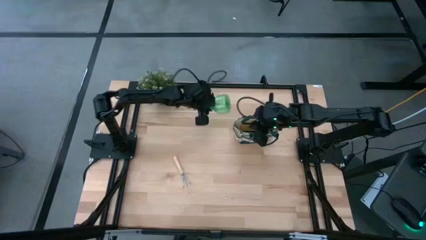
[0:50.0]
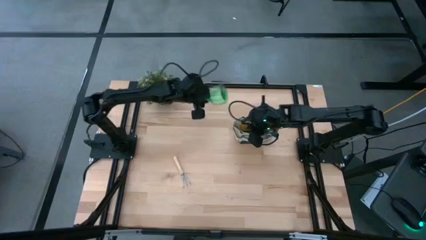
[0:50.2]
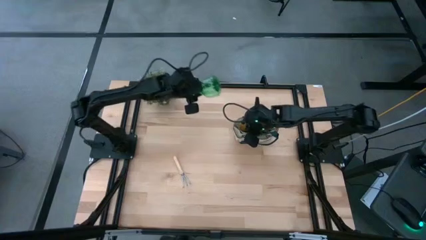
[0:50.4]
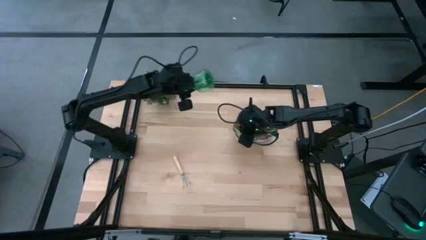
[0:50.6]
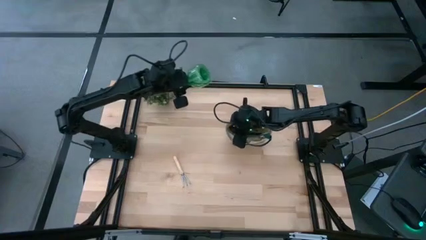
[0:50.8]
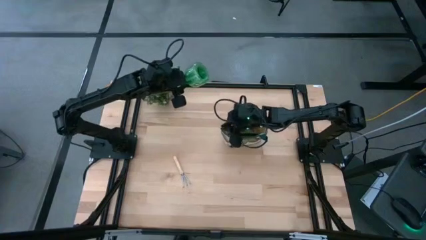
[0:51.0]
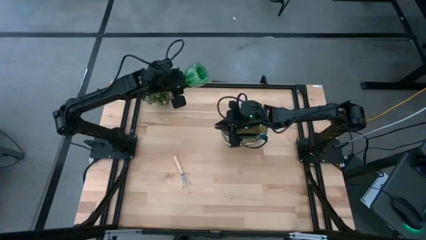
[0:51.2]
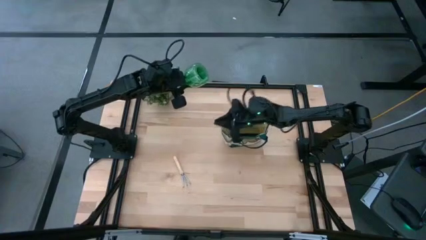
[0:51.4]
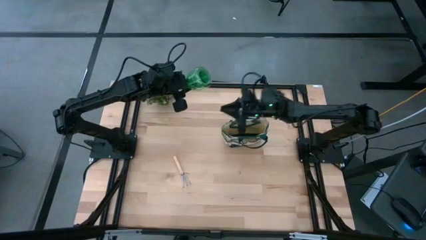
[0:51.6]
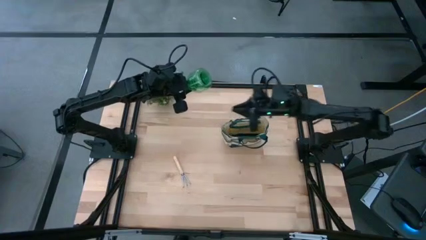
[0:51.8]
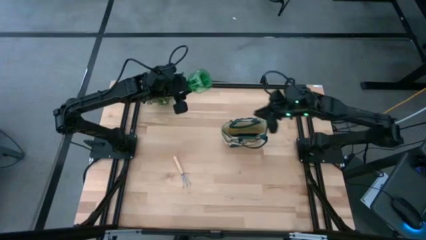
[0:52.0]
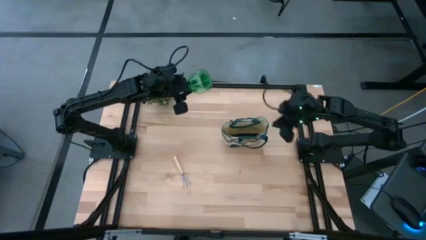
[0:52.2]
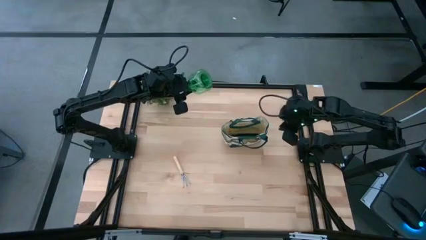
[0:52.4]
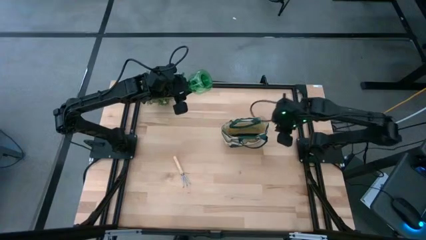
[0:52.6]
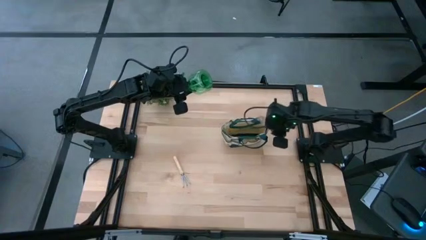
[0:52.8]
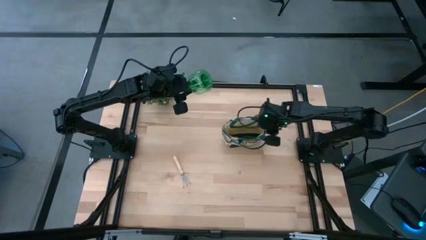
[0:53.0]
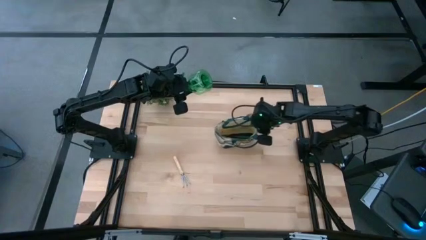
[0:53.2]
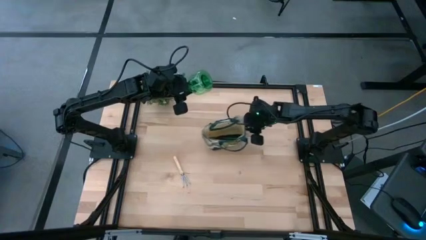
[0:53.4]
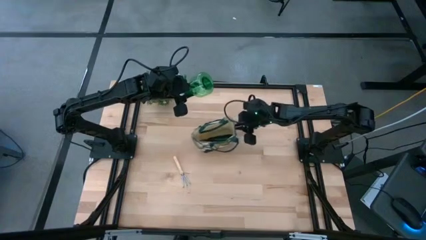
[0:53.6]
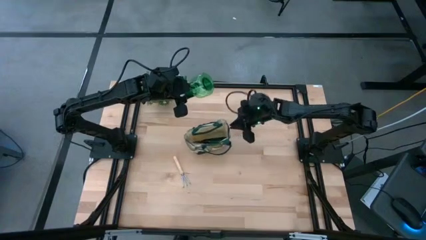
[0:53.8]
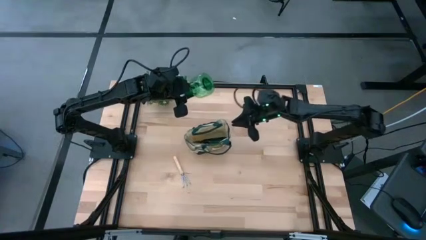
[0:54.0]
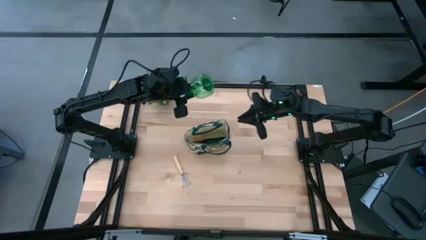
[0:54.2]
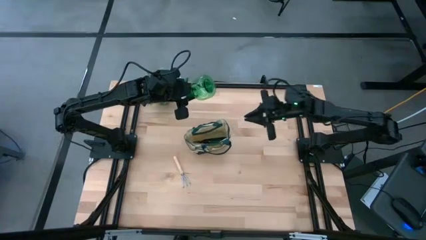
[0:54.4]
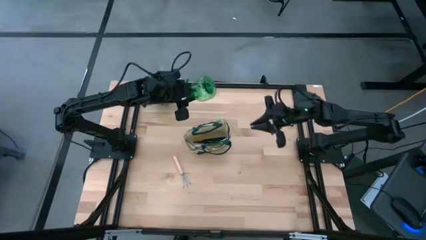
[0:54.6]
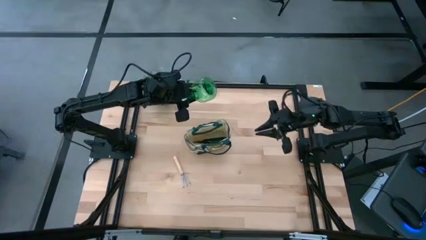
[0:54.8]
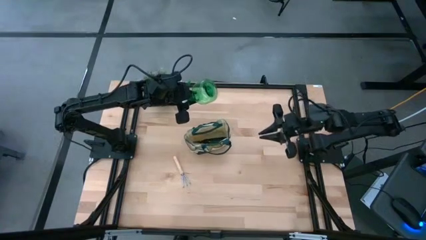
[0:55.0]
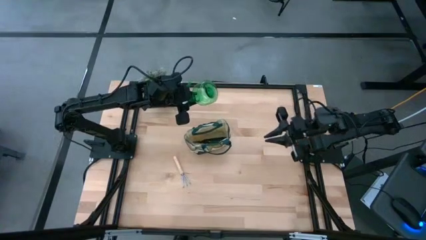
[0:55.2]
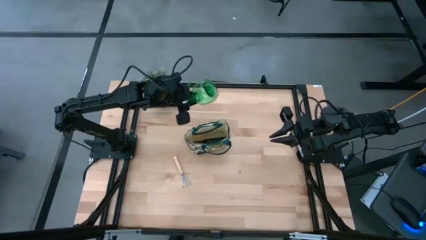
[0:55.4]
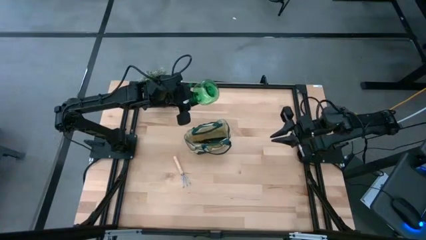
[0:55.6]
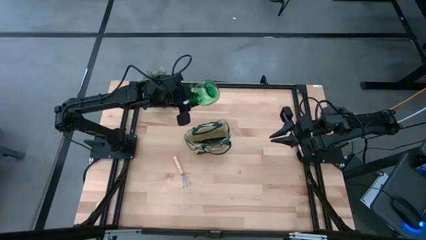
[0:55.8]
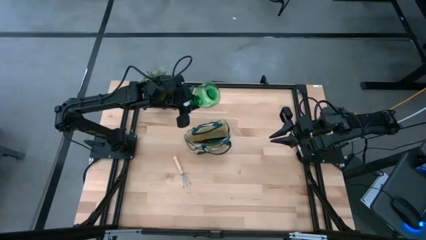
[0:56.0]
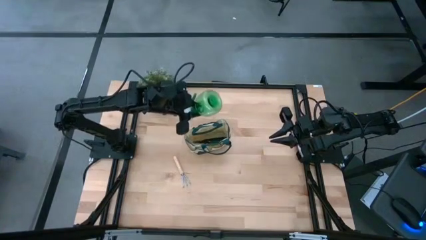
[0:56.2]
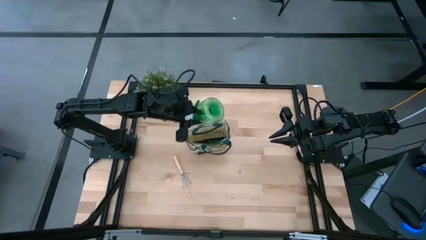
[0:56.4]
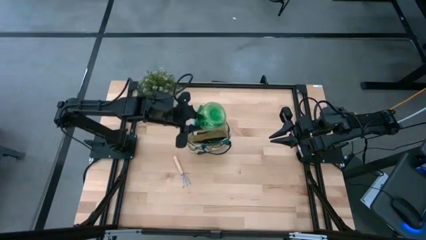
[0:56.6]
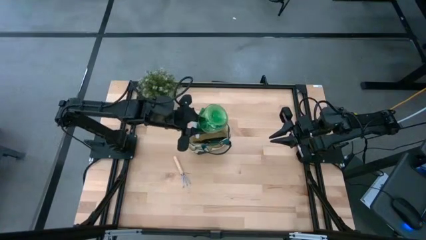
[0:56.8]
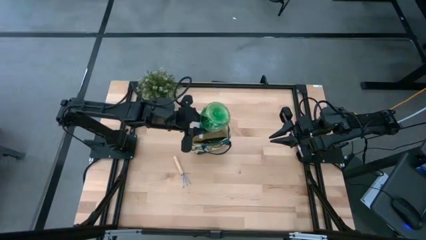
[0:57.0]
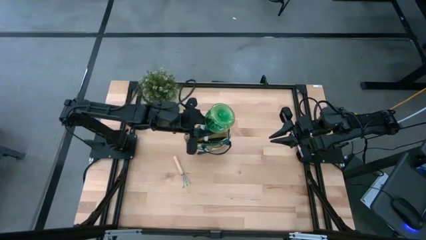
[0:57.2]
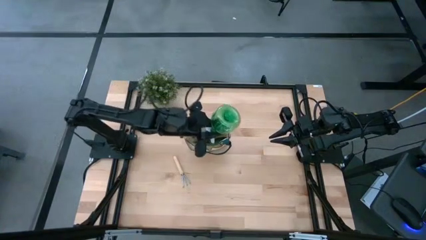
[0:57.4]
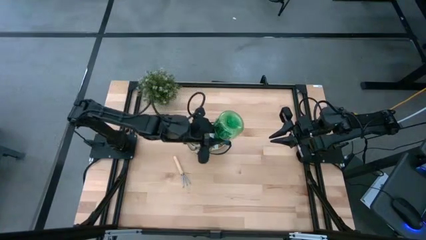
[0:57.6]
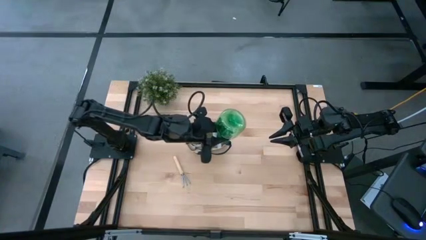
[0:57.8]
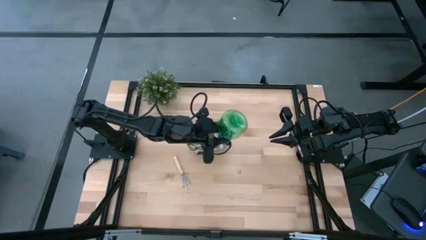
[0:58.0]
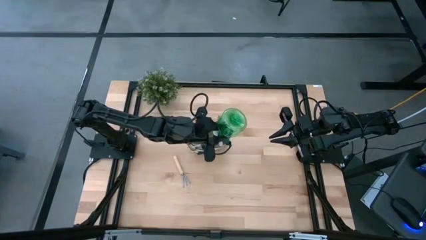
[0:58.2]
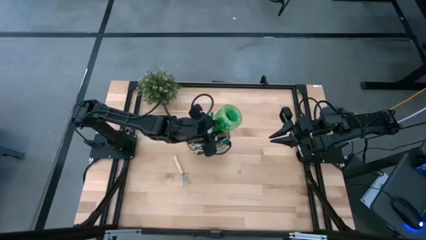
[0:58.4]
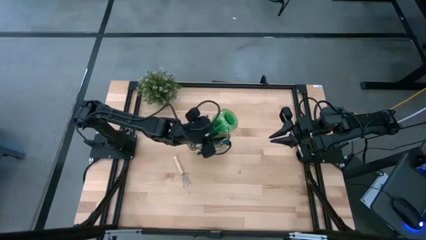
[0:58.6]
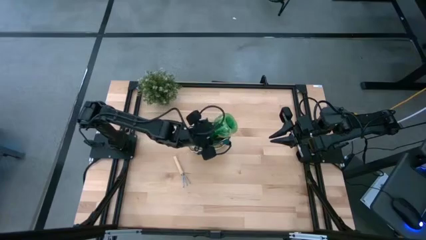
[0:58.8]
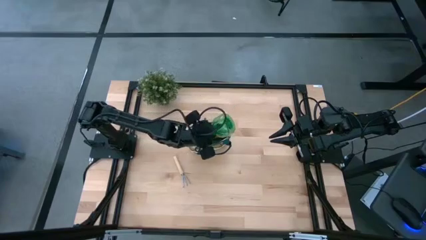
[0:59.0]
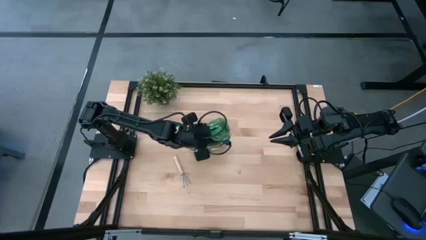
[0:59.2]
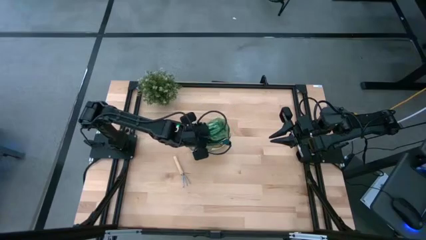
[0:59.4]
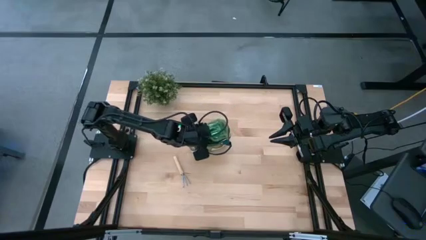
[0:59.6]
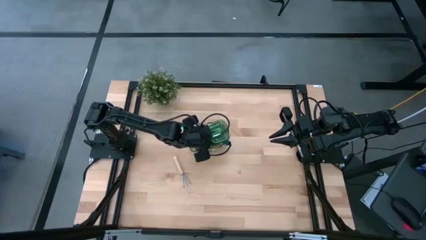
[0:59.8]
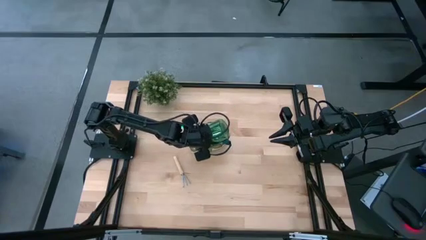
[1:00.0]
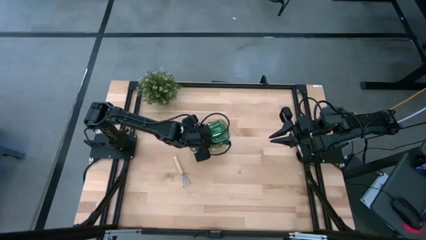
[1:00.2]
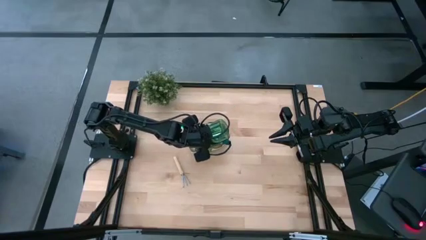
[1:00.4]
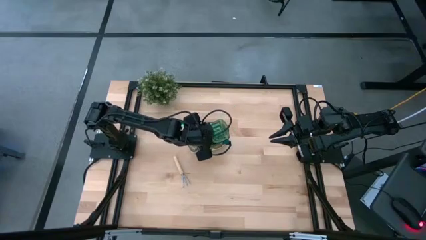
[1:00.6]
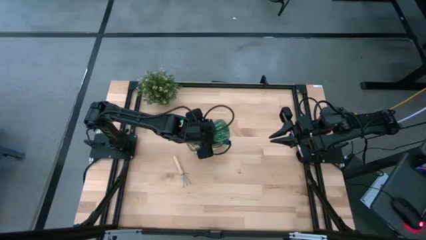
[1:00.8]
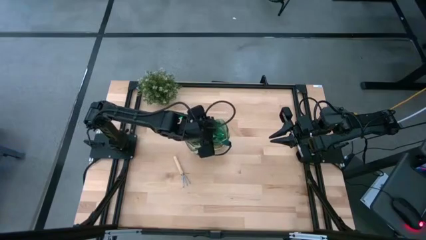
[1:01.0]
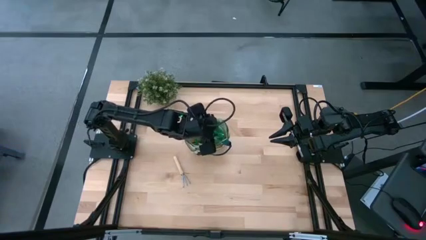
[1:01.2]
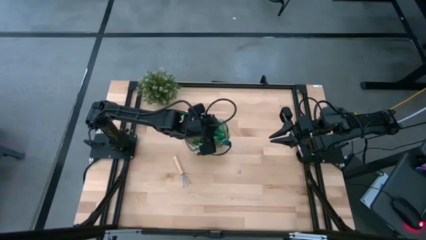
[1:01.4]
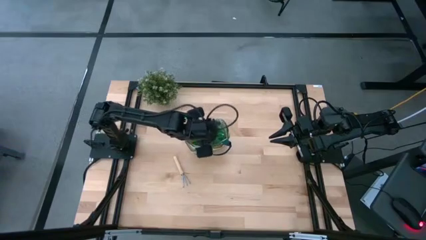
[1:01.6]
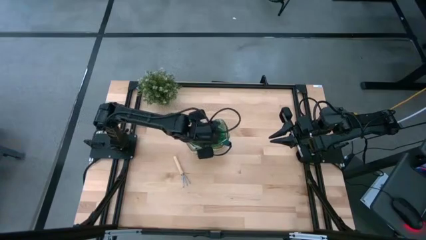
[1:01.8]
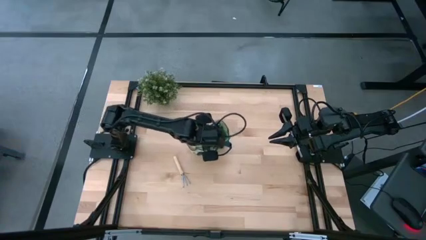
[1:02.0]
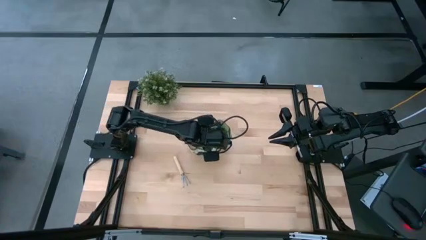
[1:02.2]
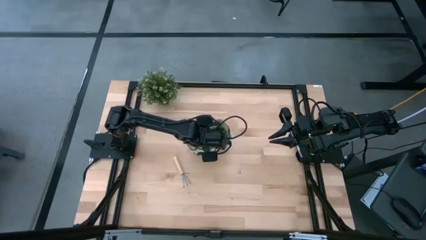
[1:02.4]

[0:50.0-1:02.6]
Task: Pick & Place Garden tools in Gardening bag
Put the spray bottle into the gardening bag

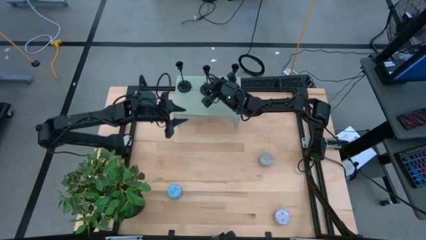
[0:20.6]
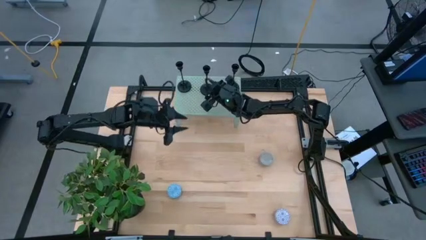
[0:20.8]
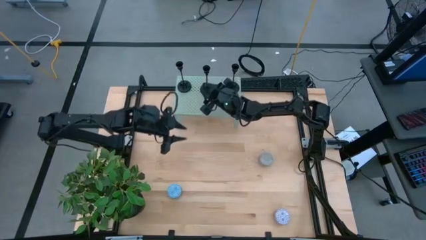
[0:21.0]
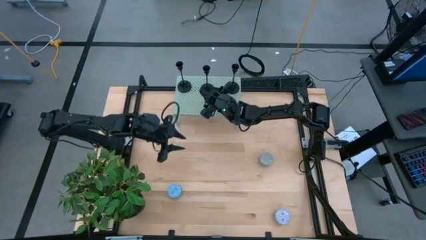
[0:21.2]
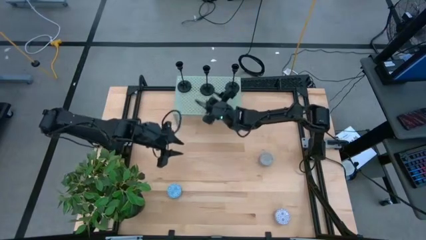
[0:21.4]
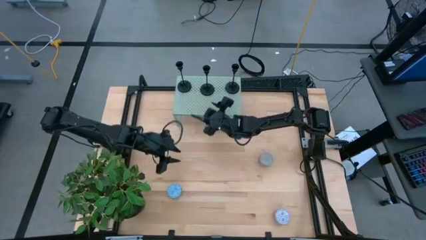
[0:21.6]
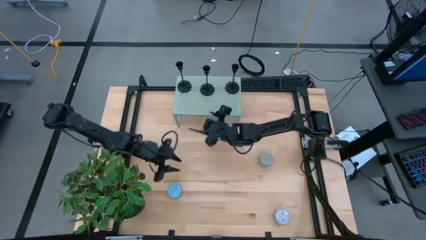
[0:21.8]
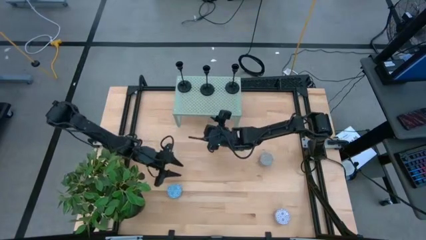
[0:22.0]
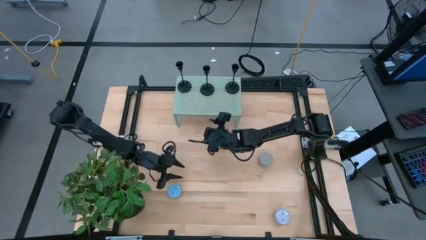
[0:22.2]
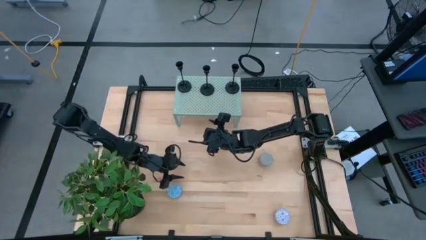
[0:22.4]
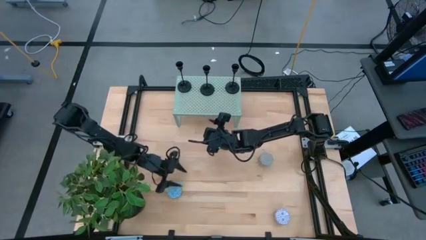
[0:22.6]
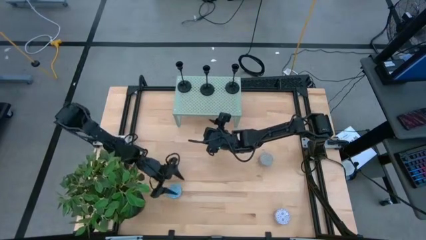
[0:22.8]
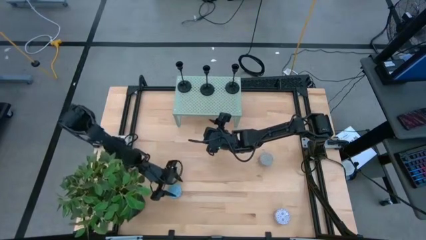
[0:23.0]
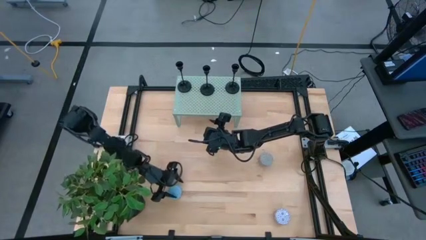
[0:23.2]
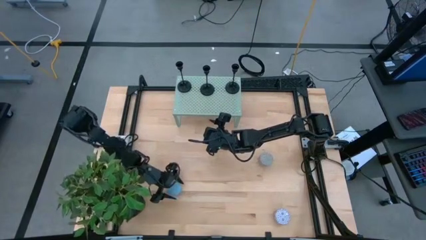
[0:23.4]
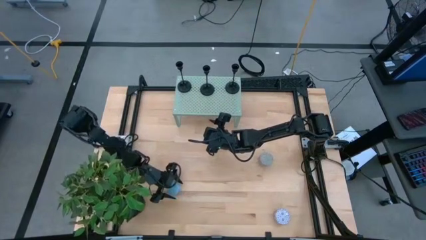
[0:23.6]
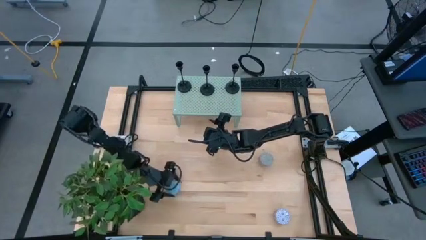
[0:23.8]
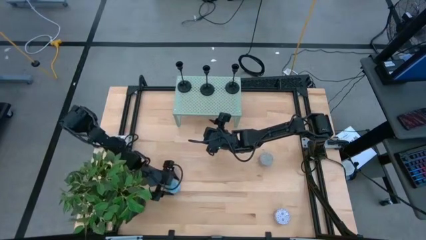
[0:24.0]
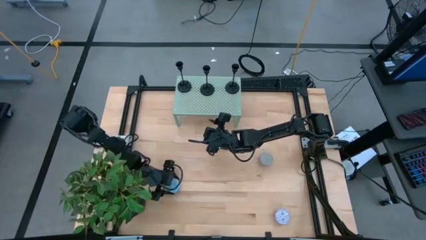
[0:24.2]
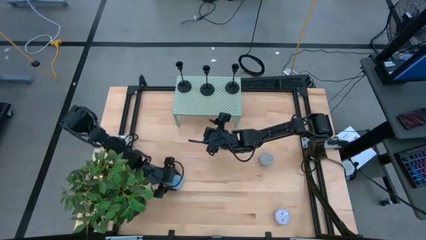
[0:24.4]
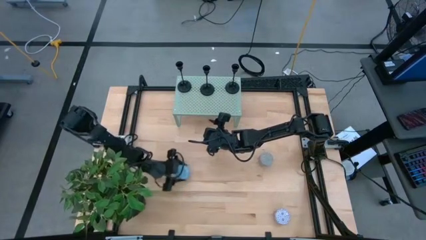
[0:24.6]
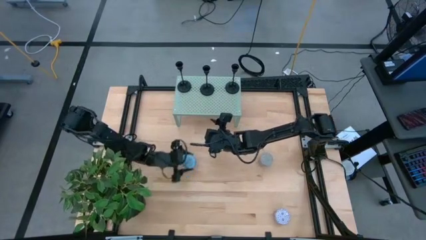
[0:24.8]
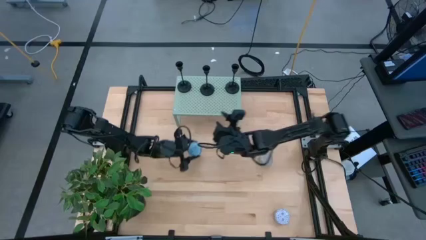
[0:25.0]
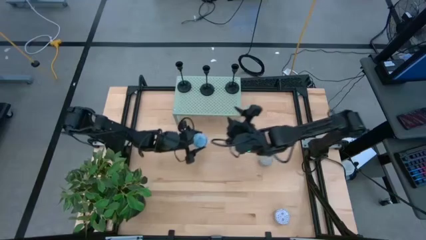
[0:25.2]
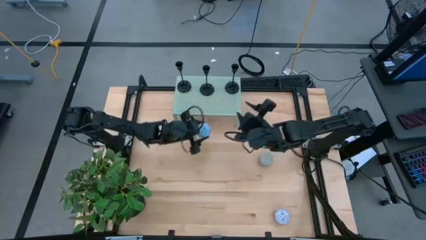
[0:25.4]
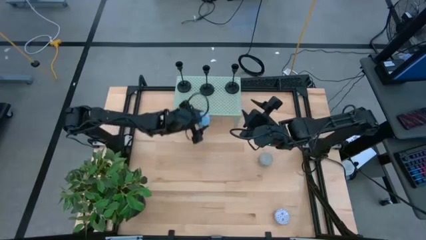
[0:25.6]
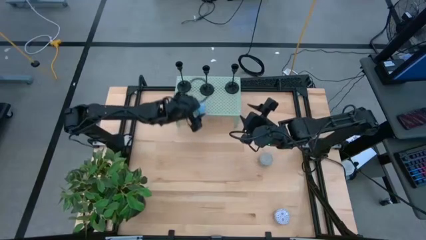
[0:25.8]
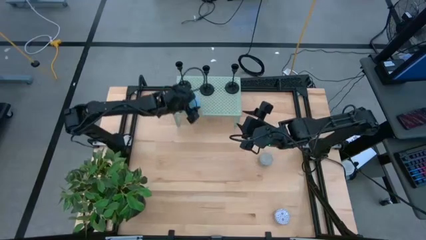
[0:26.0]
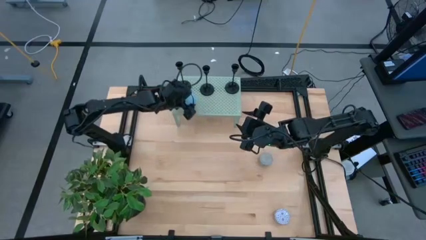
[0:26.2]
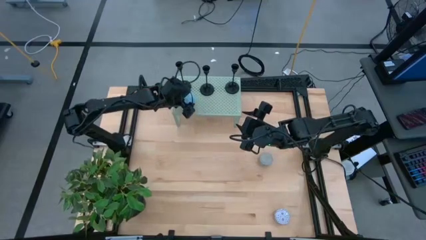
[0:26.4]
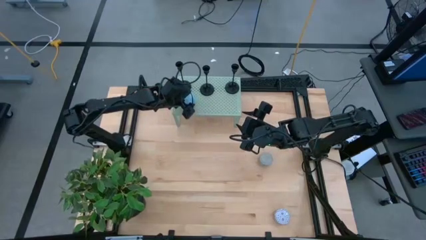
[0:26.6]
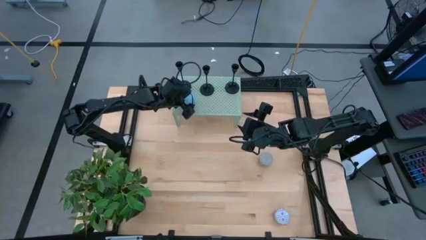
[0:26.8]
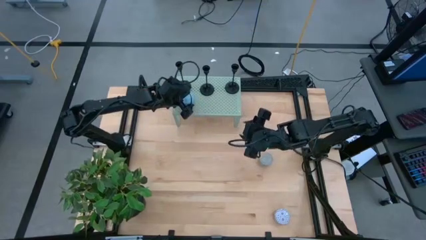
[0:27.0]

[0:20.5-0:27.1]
Task: Pick & Place candle stick holders
Put the blue and white candle jar on the shelf
